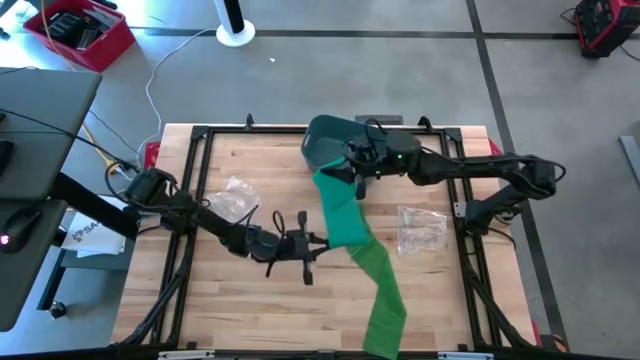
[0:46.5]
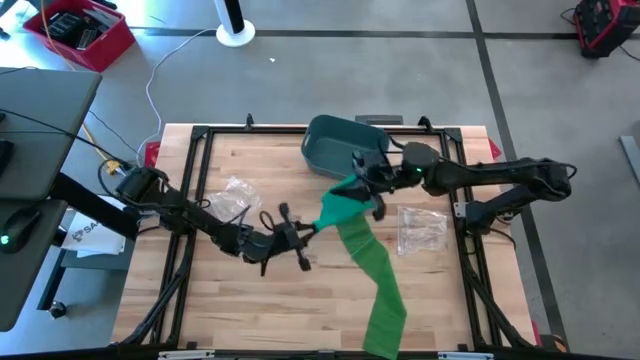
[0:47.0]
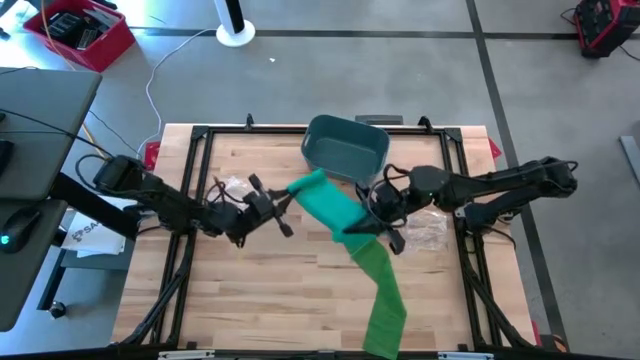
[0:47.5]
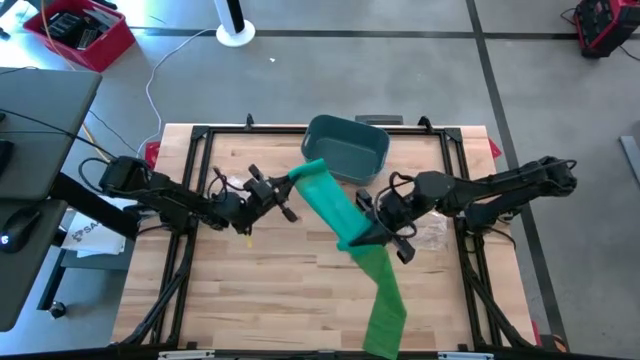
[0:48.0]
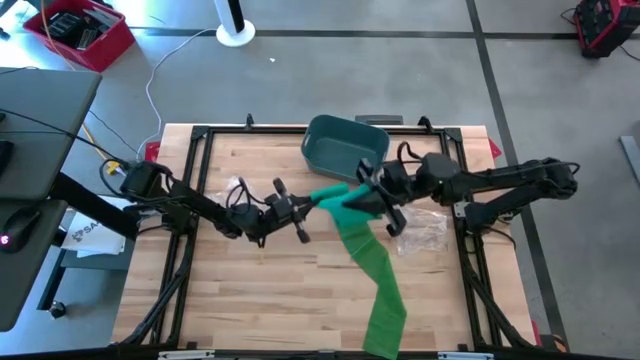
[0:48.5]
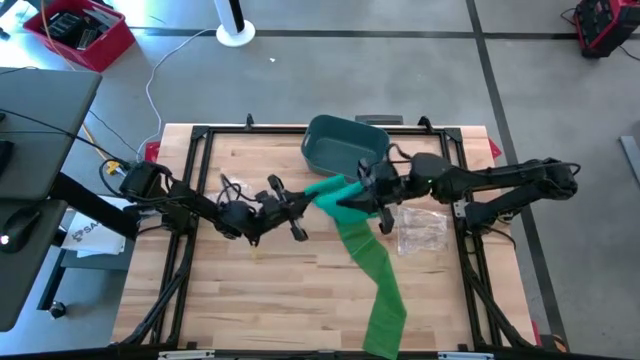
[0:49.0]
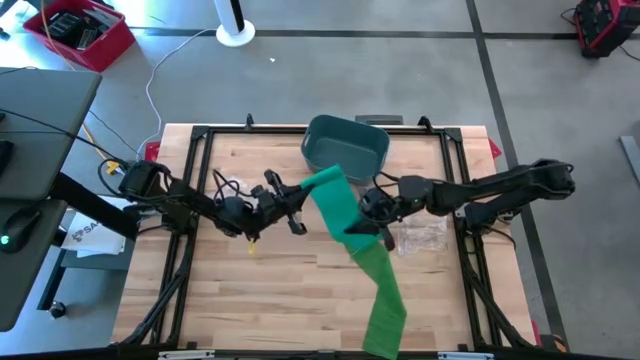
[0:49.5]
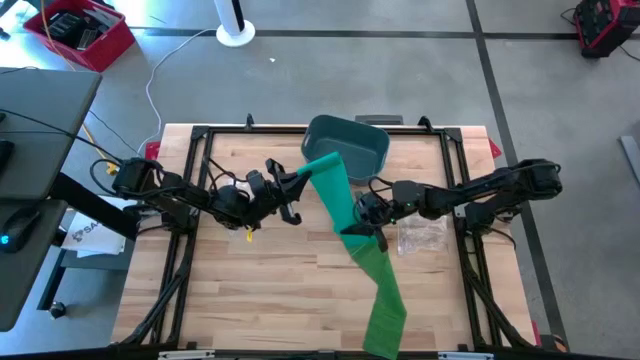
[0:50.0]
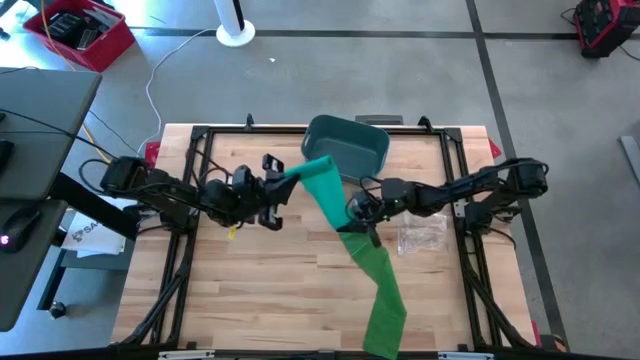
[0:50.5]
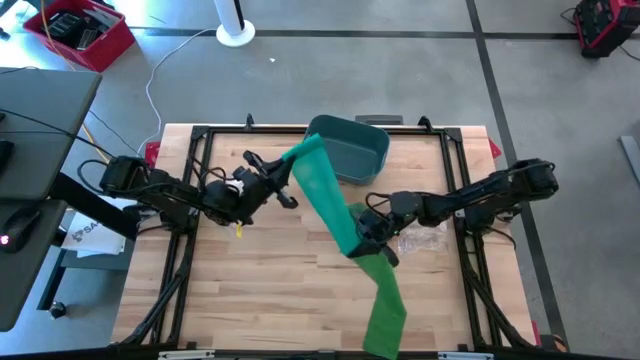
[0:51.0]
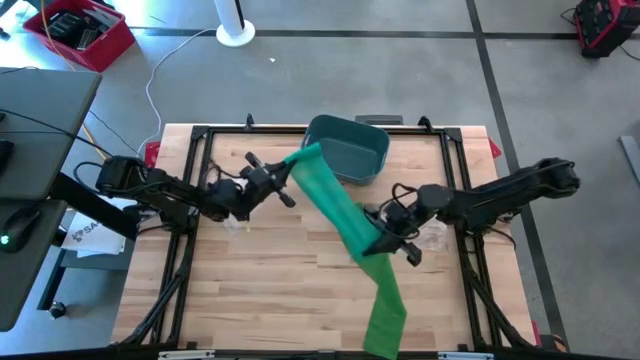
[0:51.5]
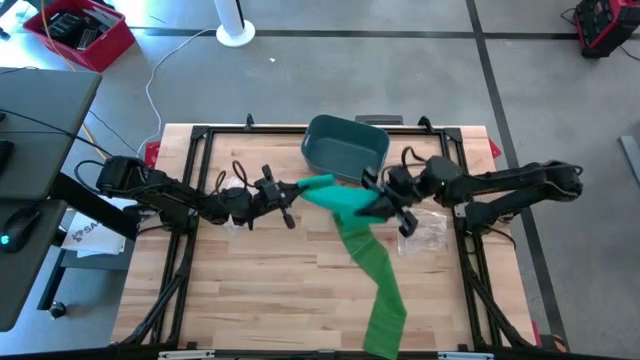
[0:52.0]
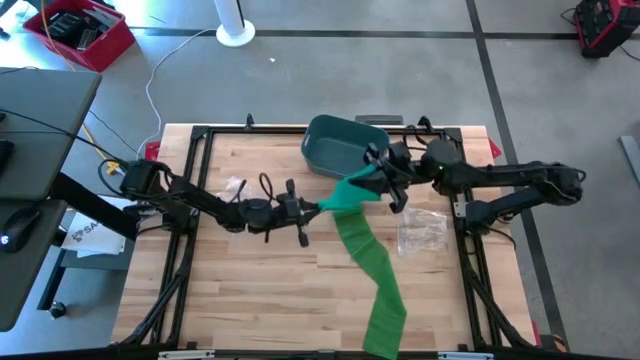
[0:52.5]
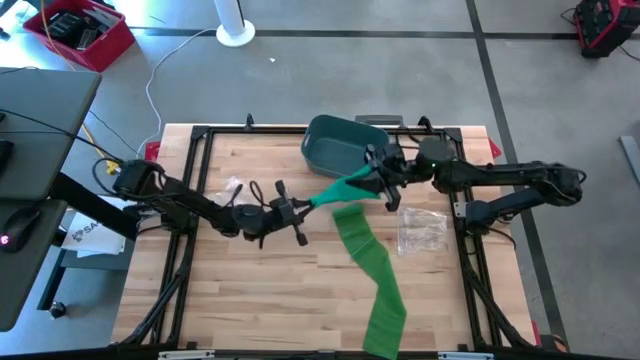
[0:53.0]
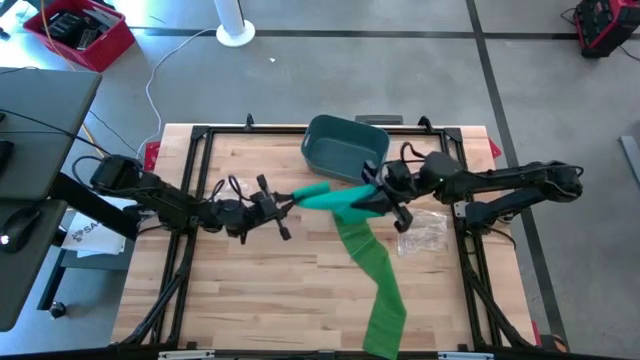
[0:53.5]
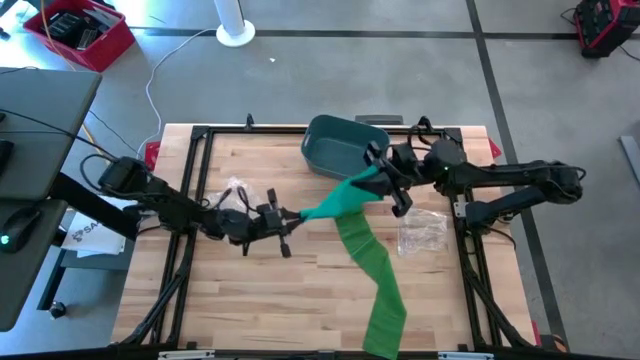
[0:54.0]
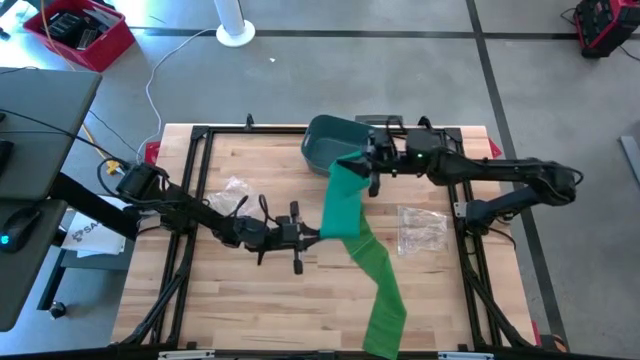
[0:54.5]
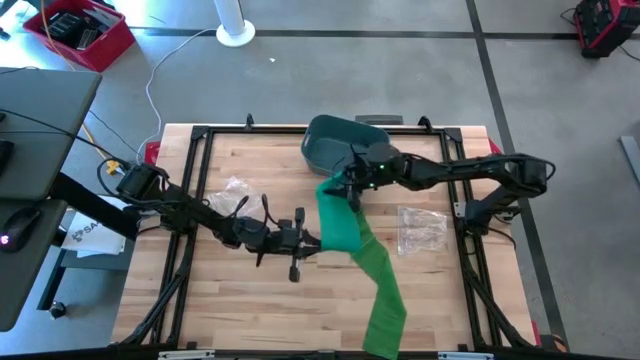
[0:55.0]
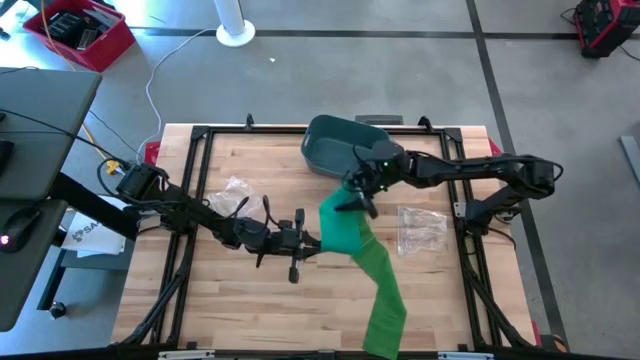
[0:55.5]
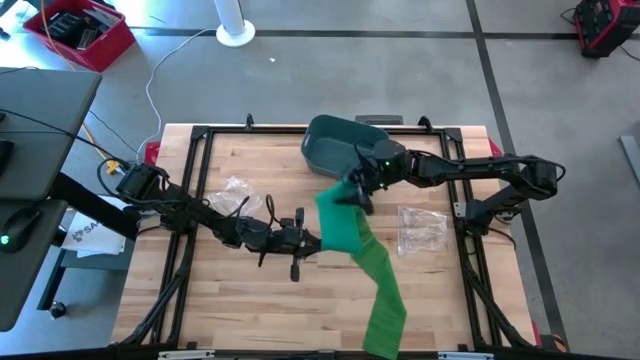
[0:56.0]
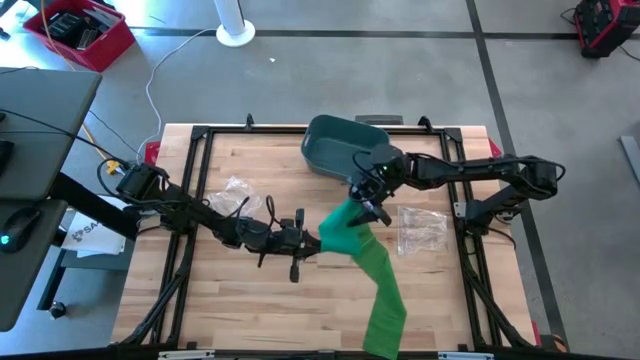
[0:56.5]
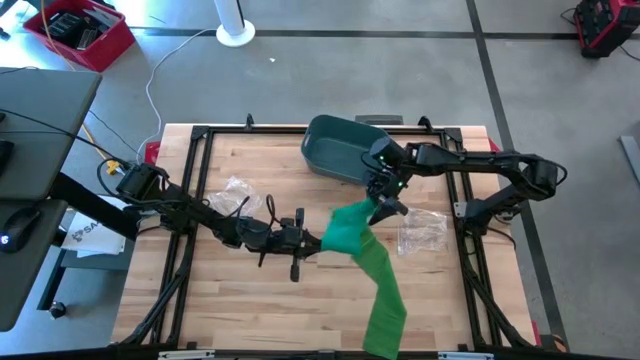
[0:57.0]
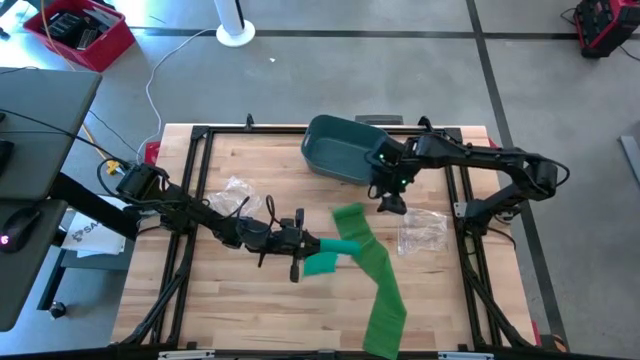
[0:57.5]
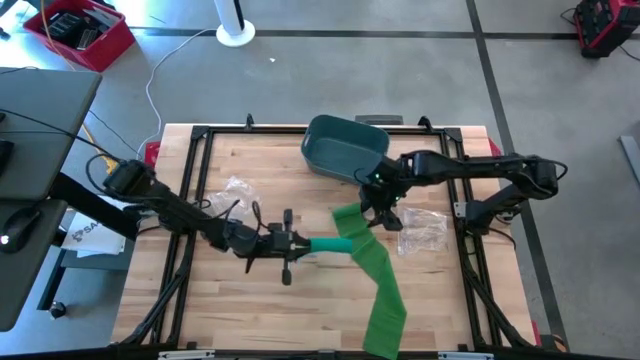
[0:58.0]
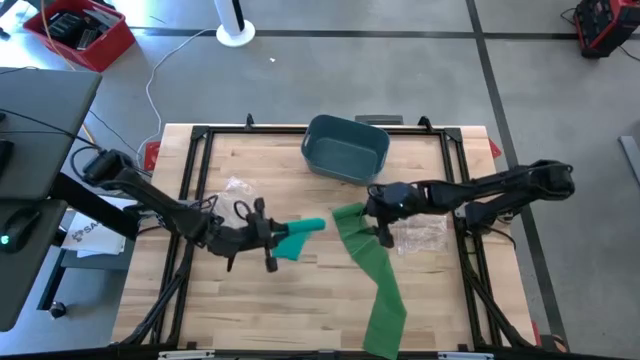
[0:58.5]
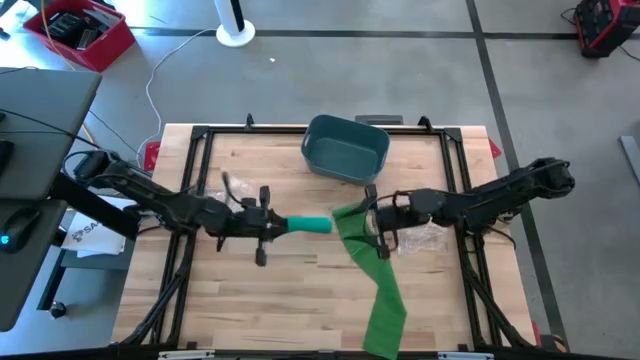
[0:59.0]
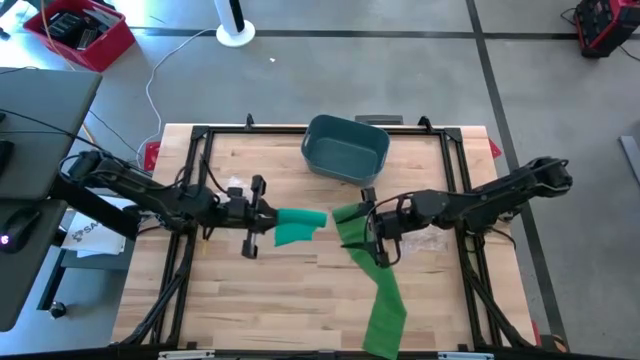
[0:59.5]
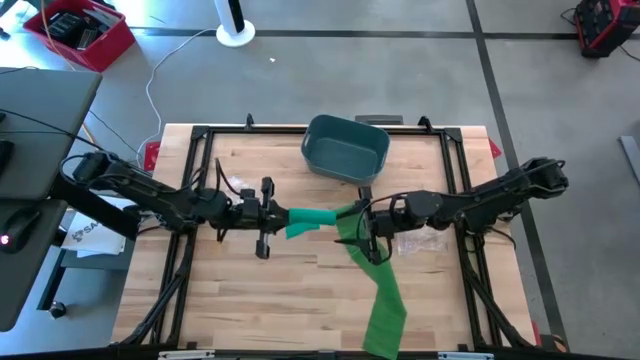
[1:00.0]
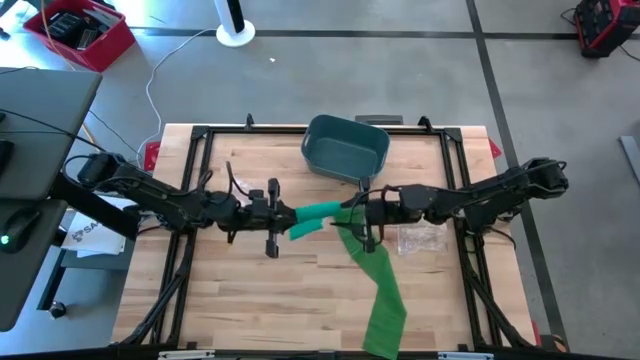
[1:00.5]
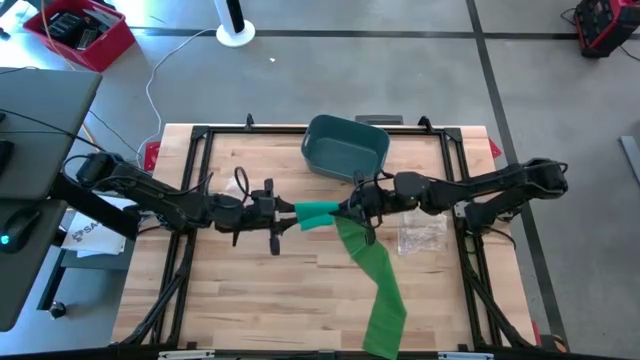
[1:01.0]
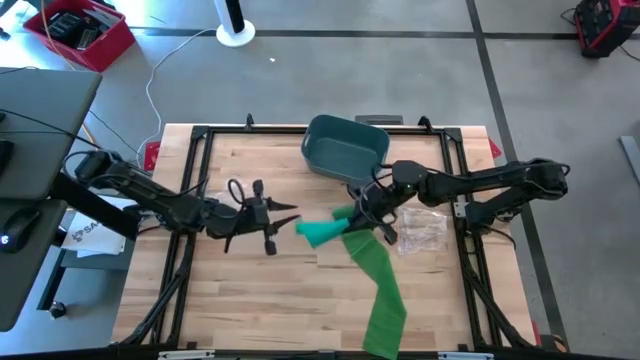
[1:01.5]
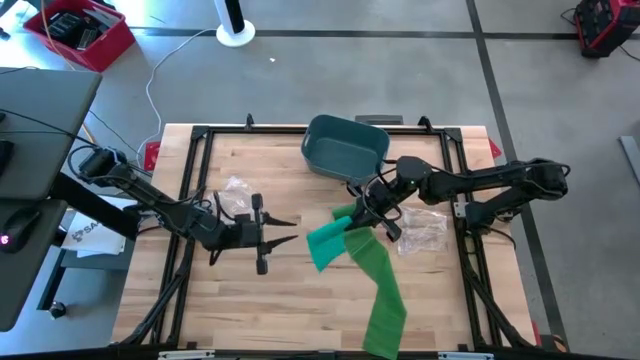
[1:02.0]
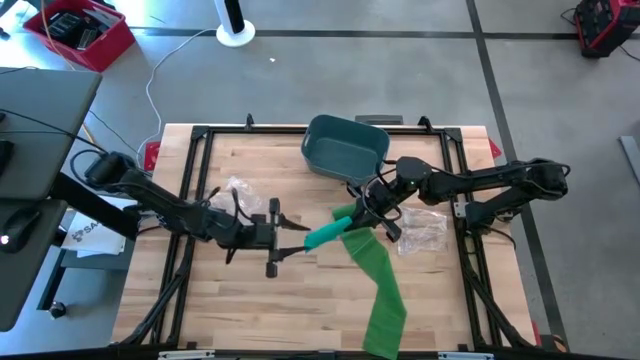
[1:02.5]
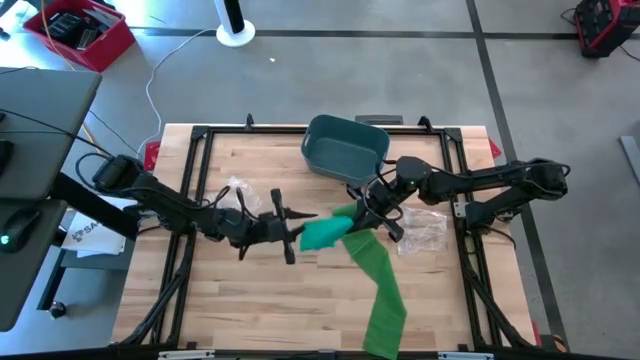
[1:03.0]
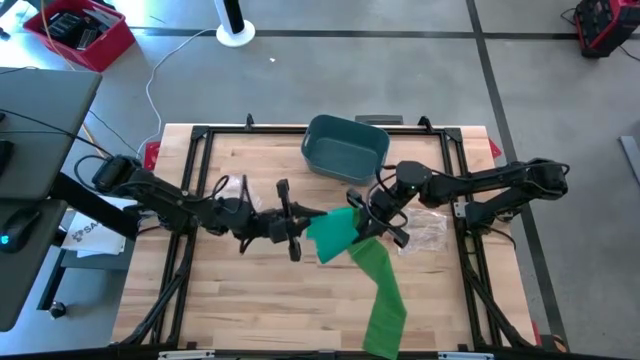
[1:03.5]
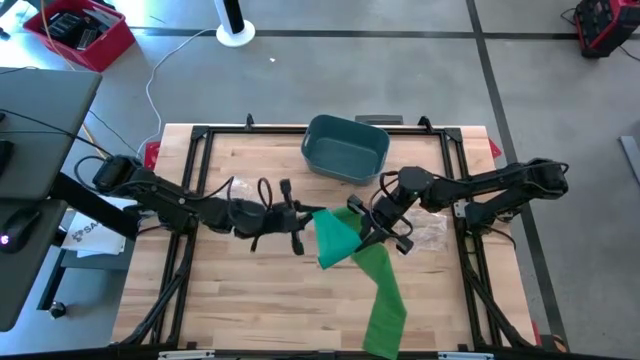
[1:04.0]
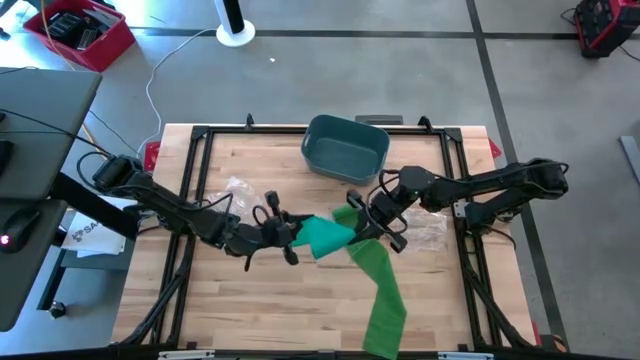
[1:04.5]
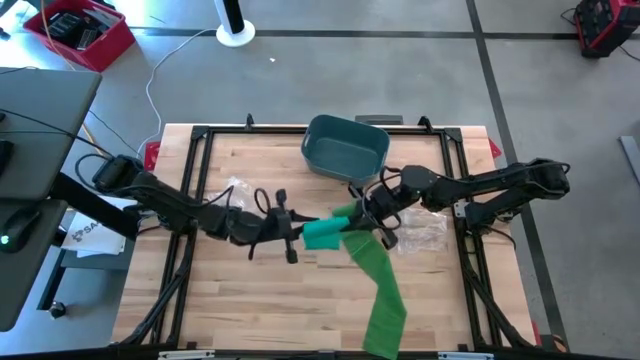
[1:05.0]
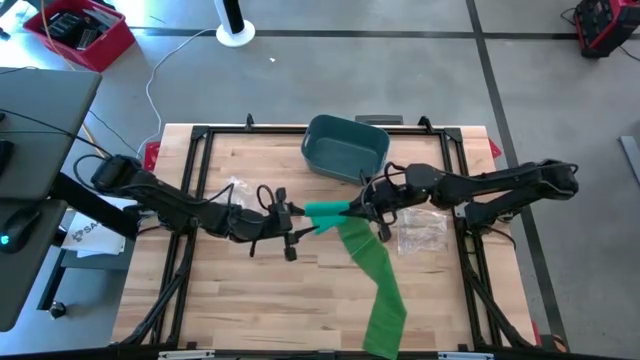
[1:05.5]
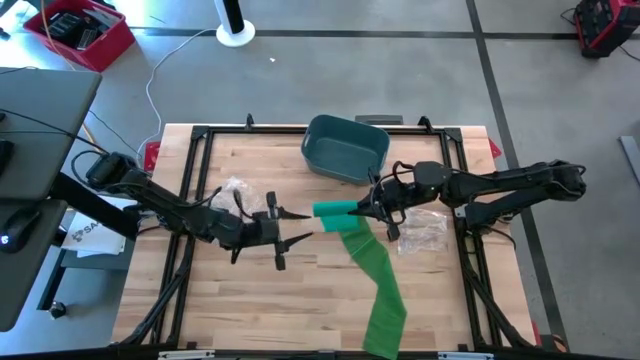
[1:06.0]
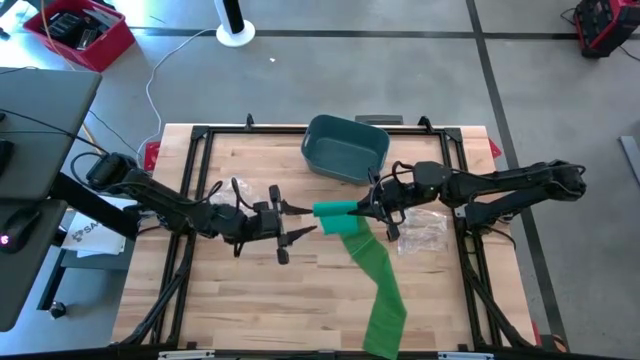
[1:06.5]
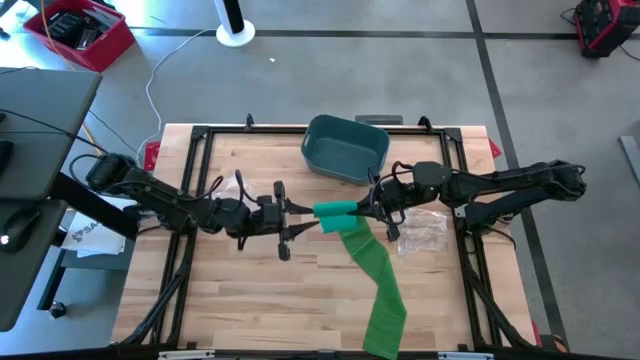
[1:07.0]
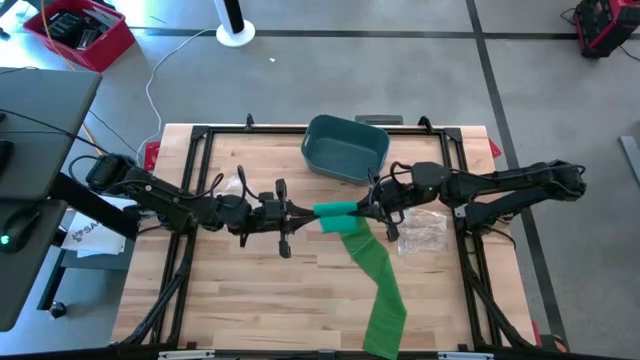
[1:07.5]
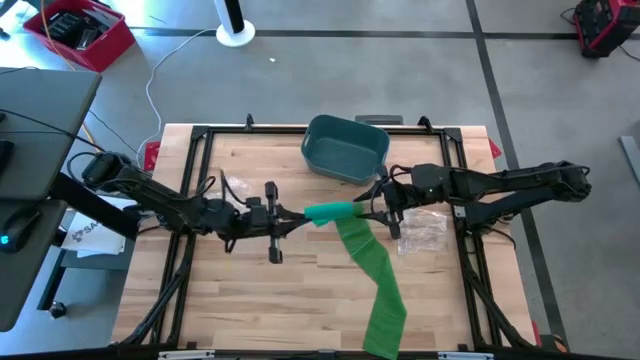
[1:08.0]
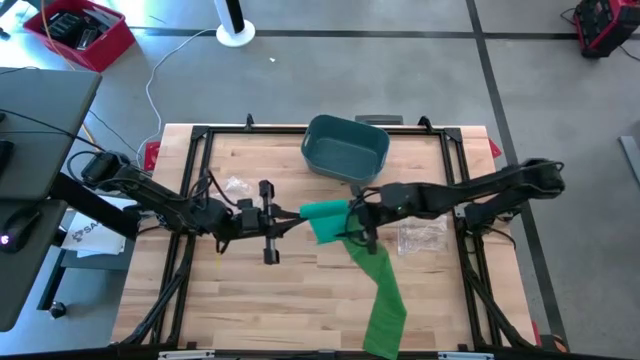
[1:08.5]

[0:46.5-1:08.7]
Task: Roll bandage
Roll the light green bandage
